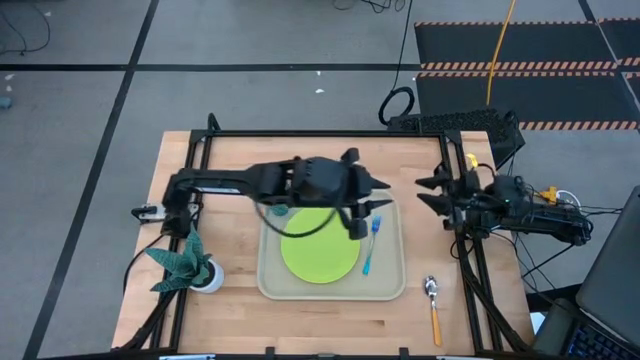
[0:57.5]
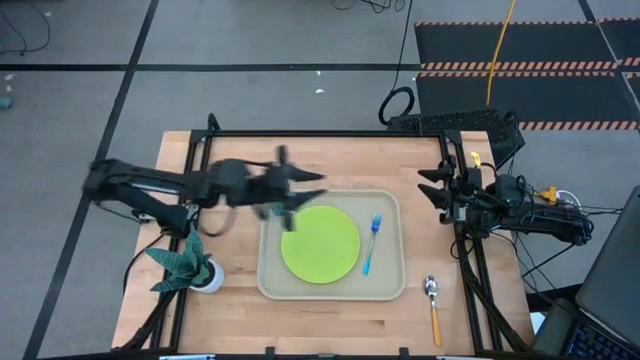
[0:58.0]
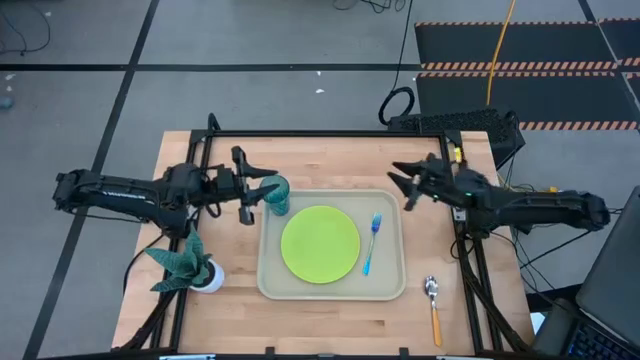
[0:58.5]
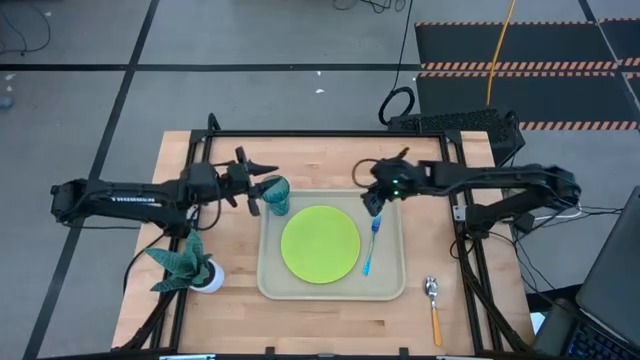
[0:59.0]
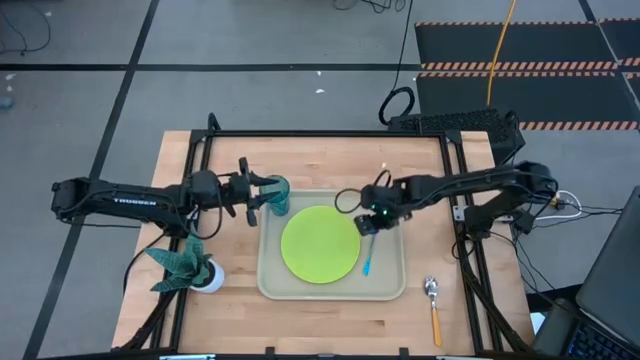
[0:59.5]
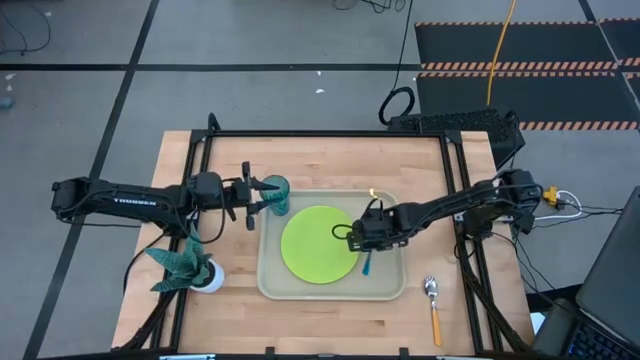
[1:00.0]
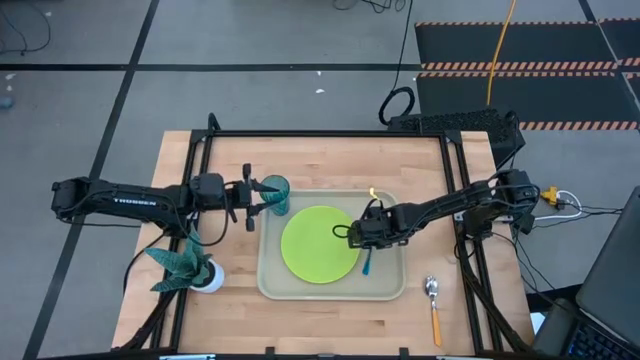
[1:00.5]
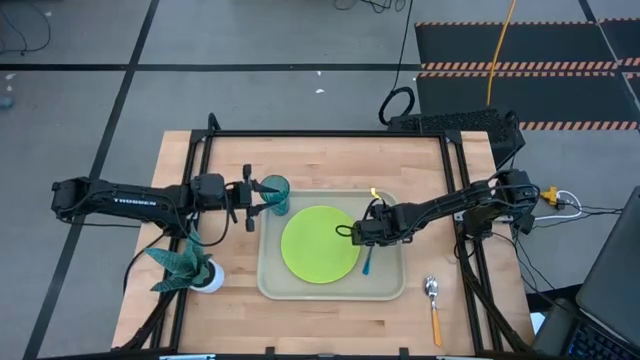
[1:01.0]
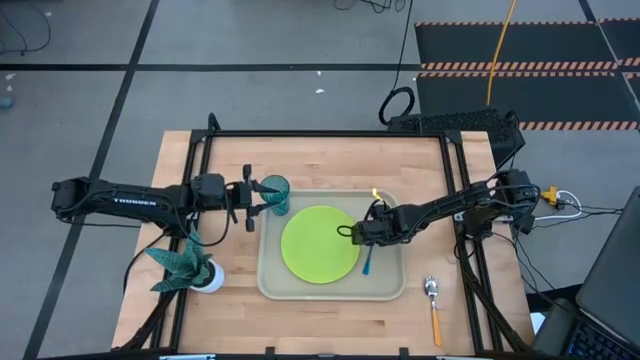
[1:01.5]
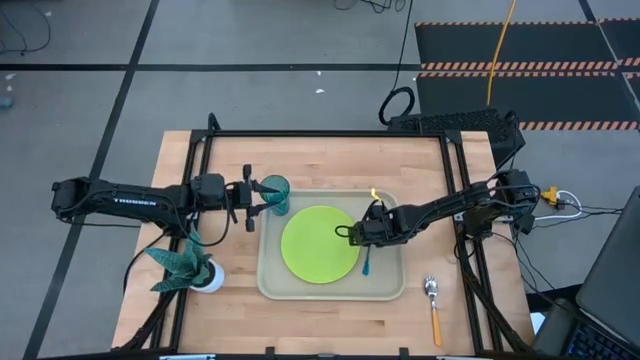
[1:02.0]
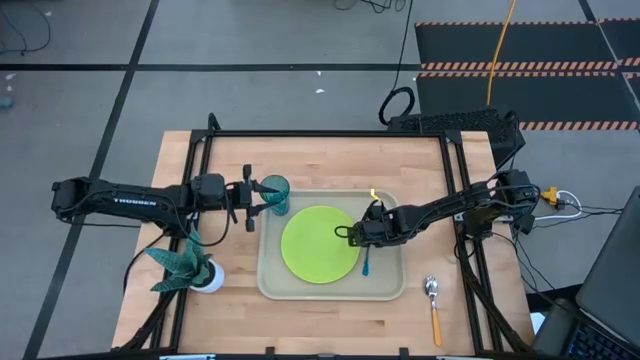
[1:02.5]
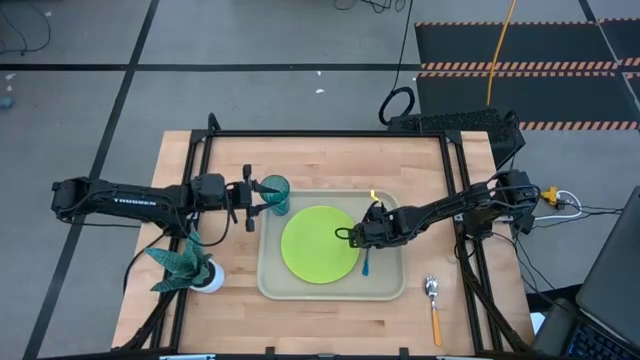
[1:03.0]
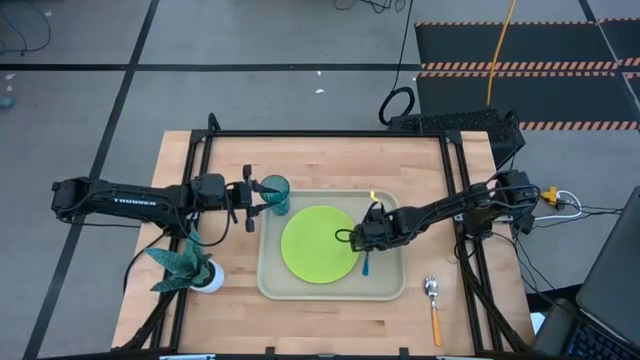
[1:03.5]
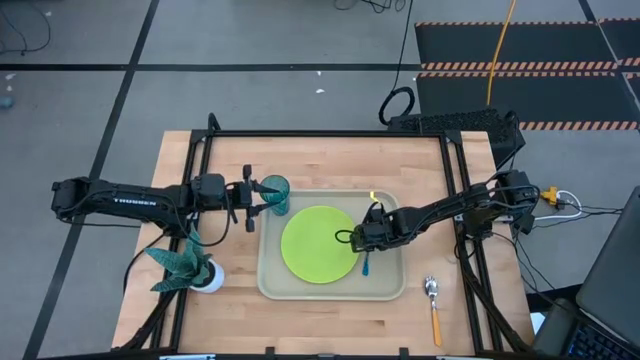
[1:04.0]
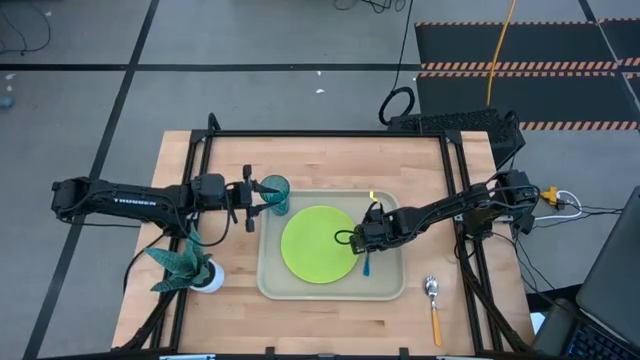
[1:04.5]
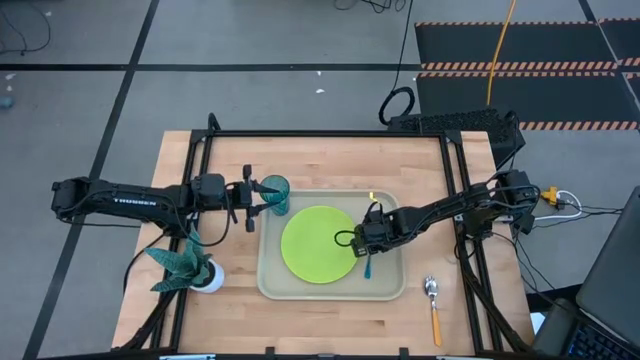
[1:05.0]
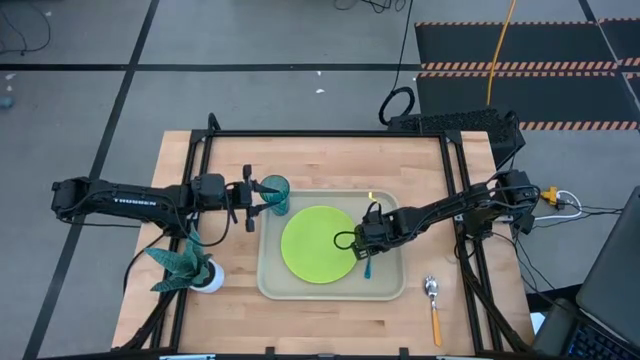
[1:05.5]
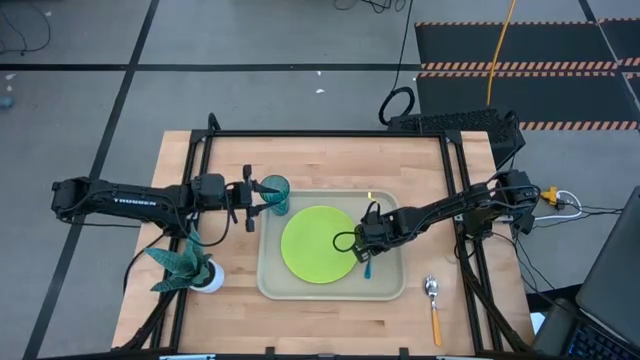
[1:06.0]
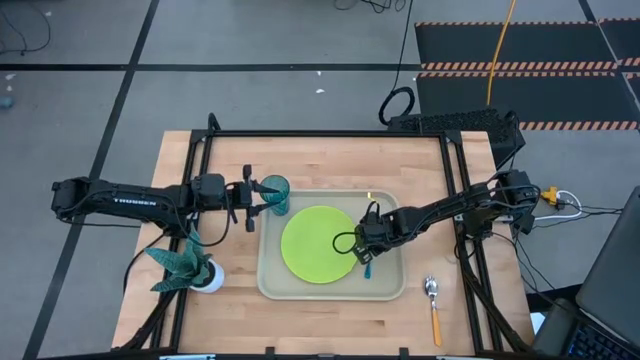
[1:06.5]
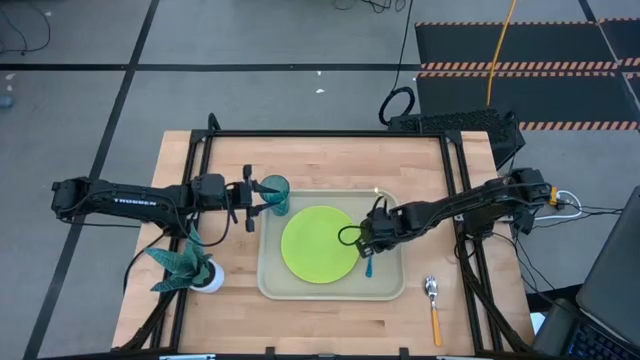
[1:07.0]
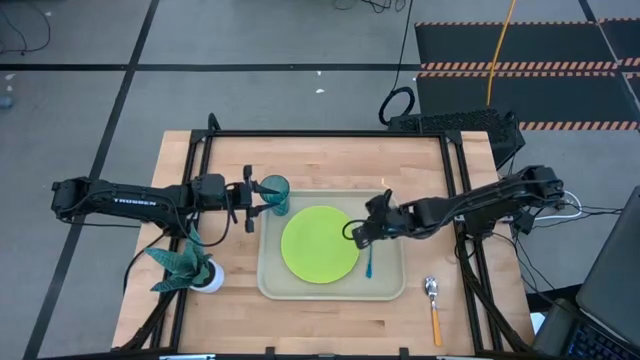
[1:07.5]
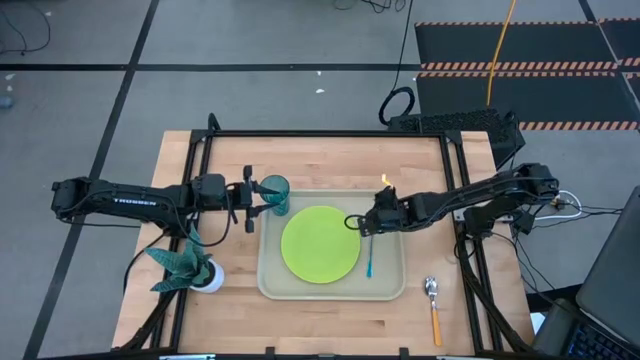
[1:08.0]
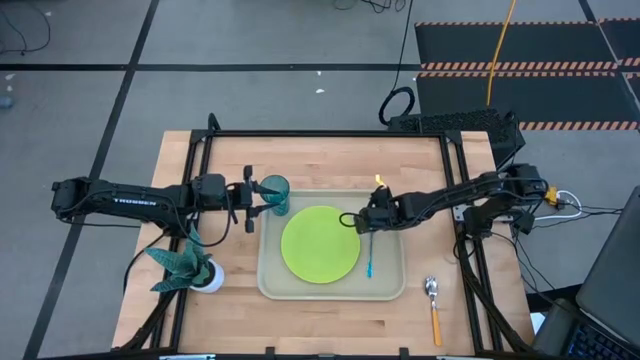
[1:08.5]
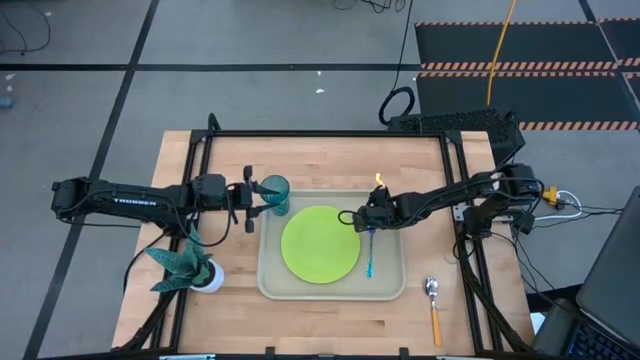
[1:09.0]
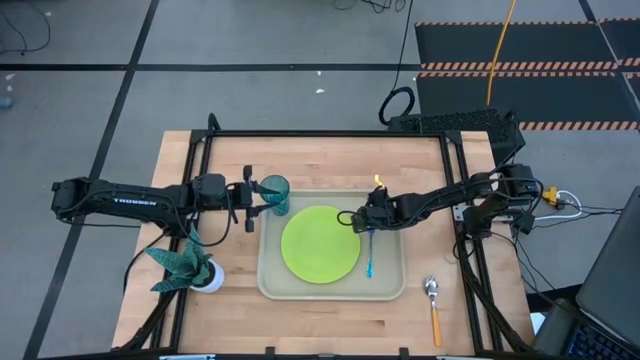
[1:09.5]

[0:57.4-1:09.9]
Task: Pick and place plate/cup/fork/spoon on tray
Put the iridescent fork on the gray serving tray

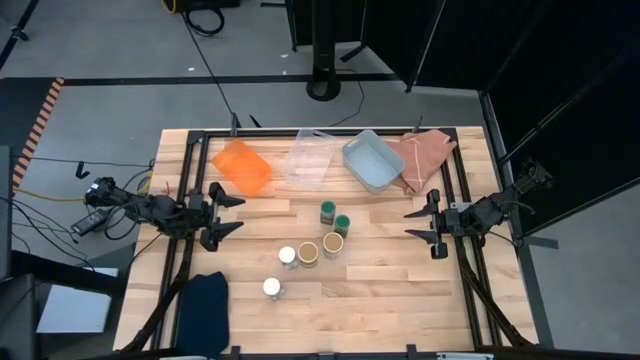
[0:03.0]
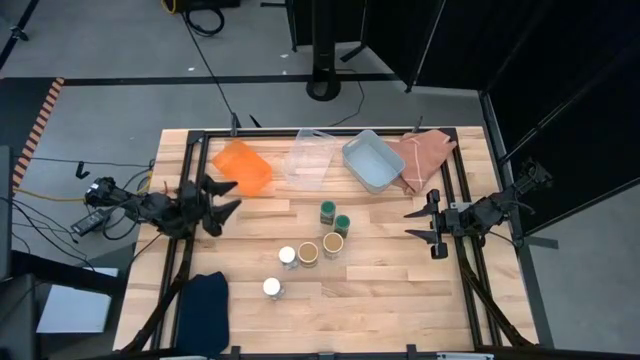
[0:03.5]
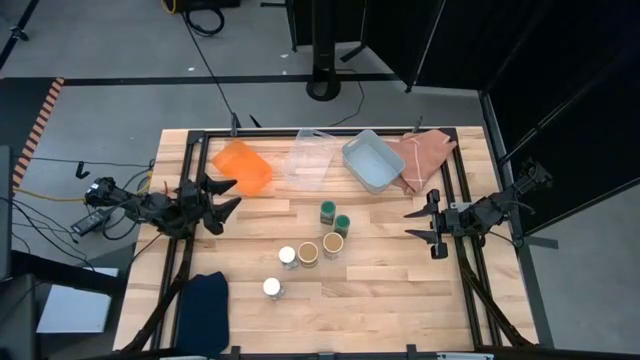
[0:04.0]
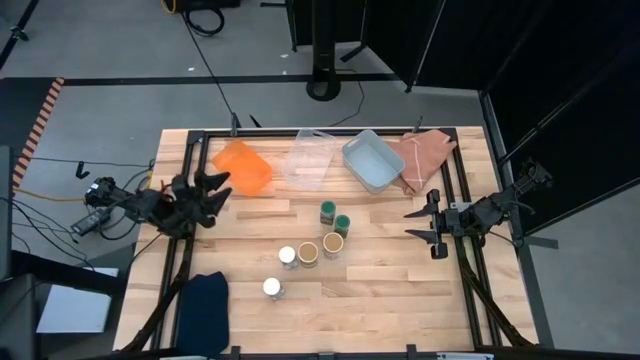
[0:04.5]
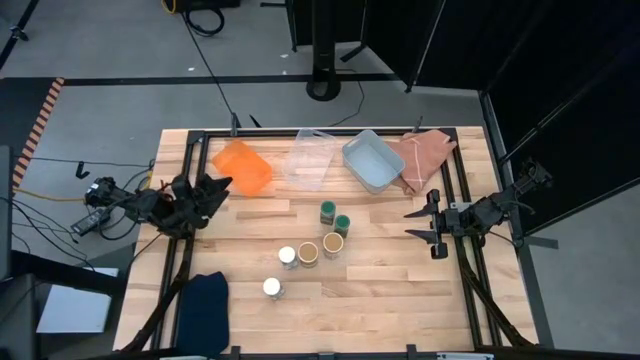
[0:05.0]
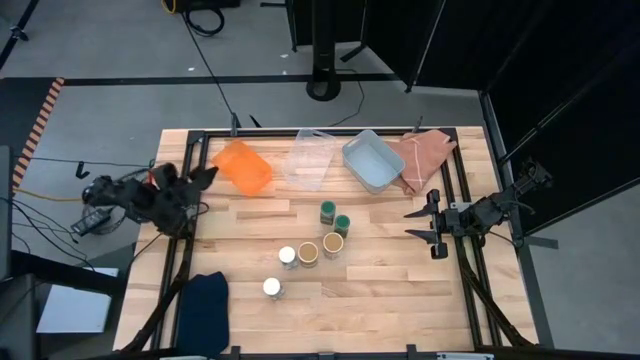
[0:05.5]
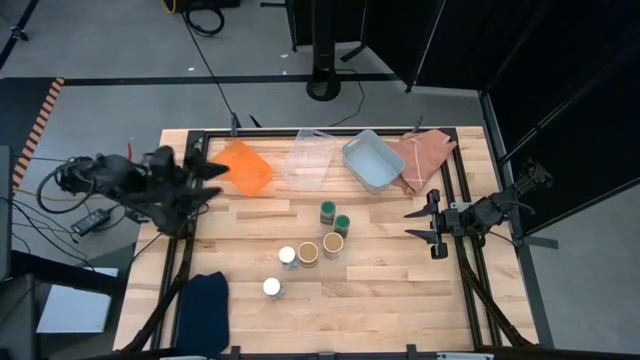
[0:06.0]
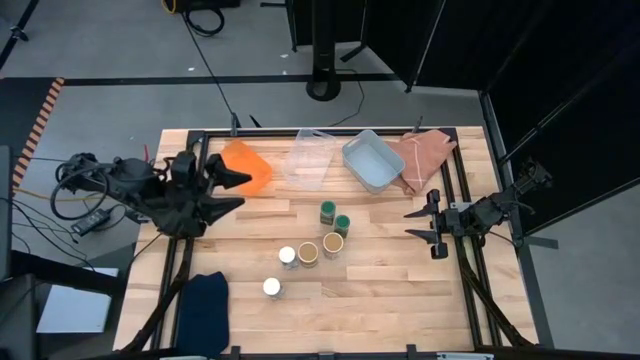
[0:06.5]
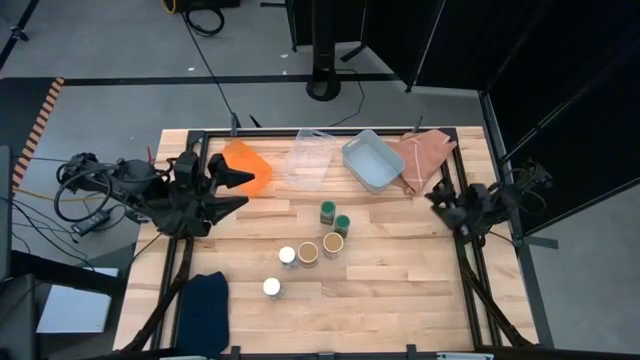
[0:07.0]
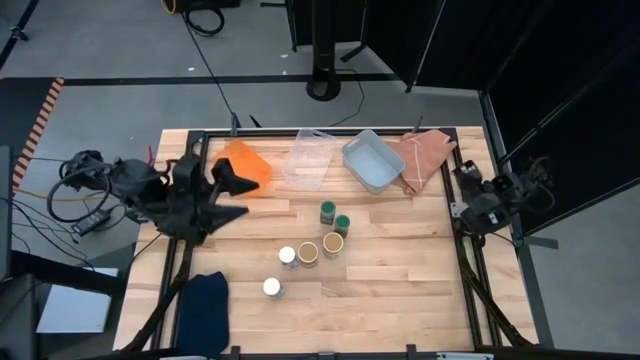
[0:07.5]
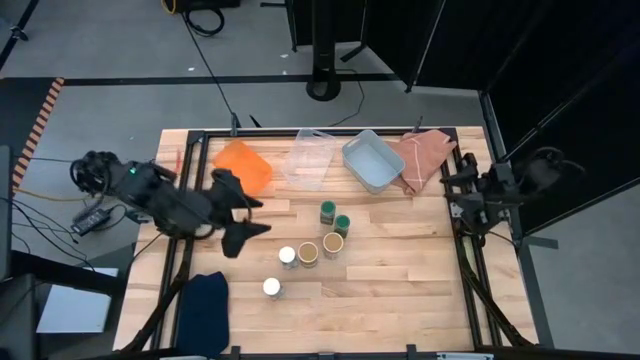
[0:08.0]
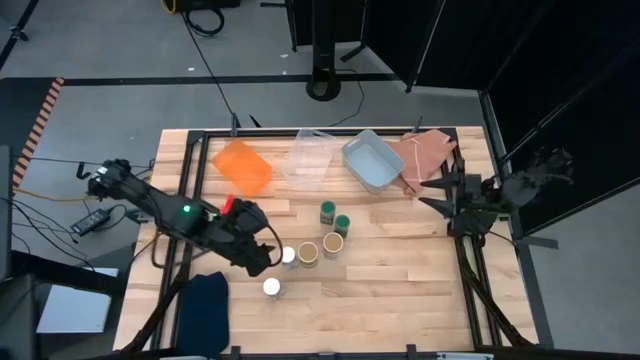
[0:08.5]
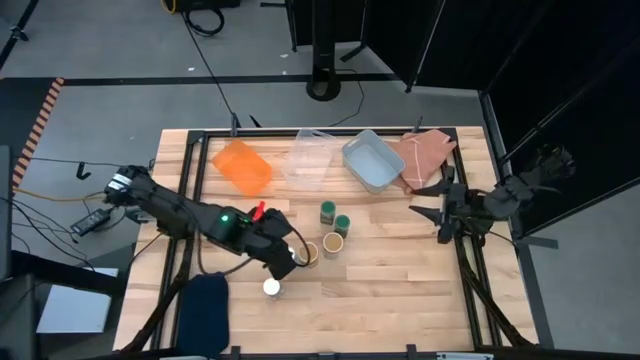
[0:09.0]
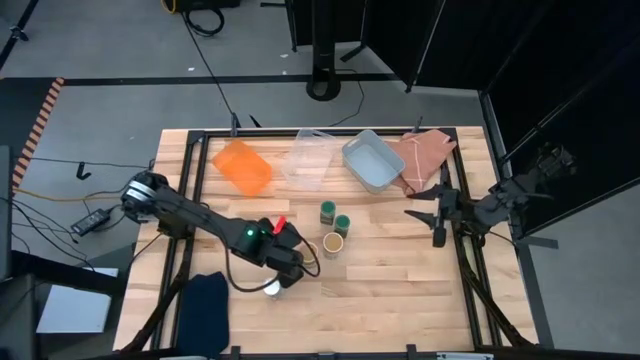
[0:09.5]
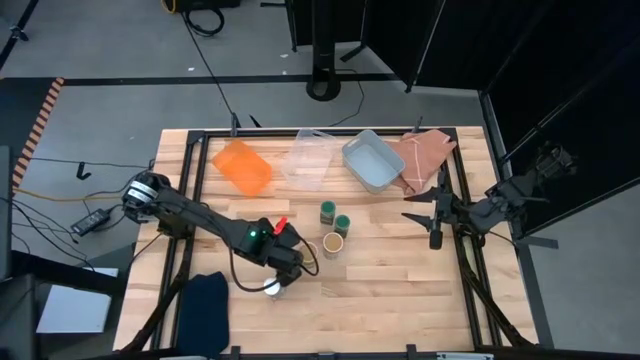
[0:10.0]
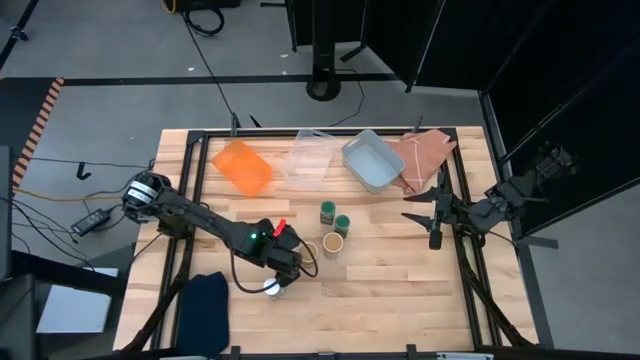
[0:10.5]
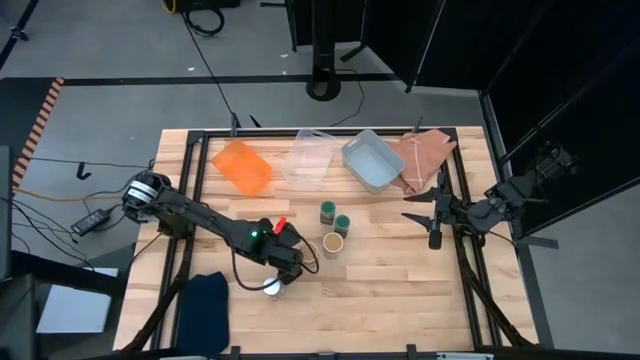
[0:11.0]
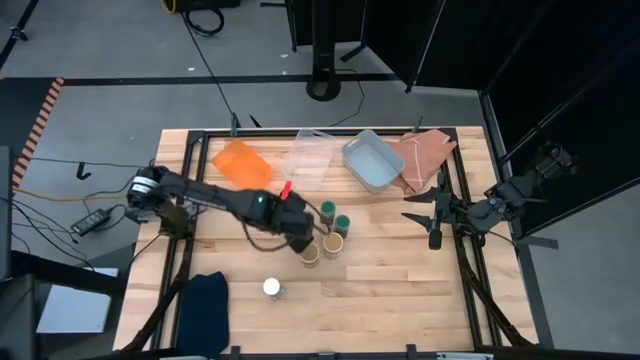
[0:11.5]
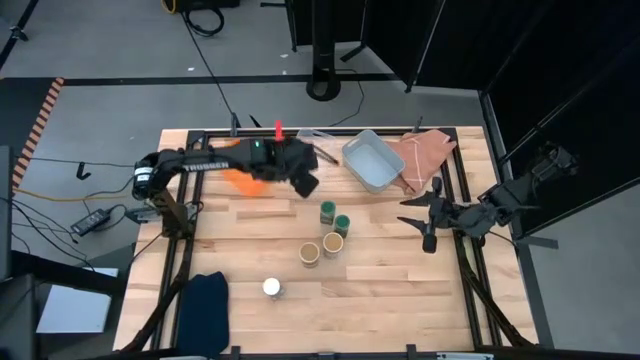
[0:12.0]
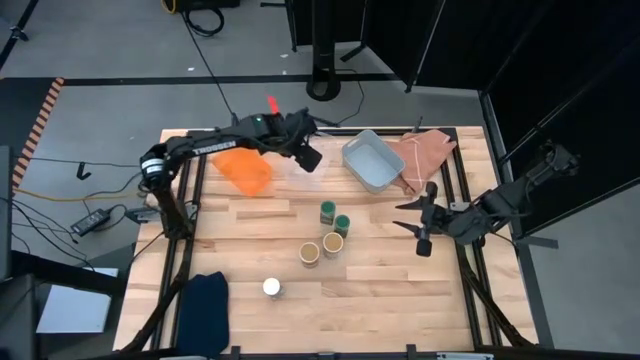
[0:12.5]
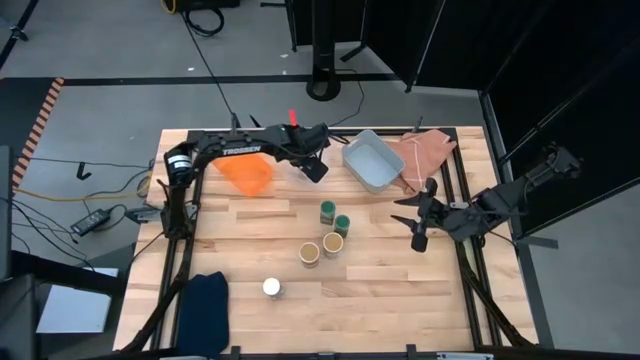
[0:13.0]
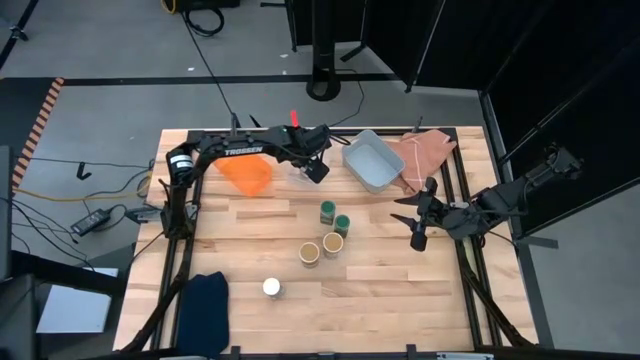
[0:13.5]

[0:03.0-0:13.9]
Task: Sort spices by type
Put the top white seasoning bottle into the transparent bin
